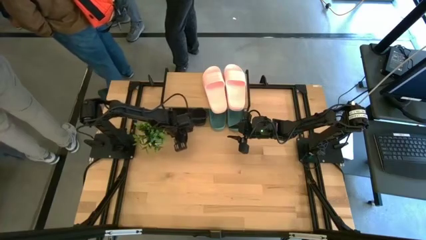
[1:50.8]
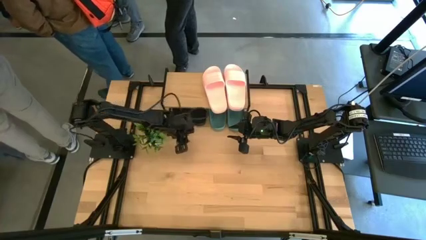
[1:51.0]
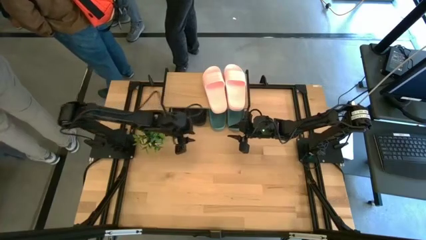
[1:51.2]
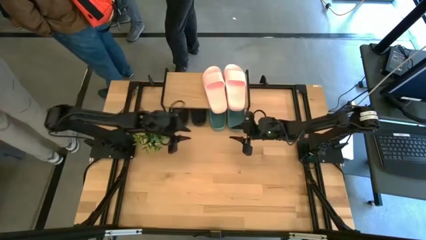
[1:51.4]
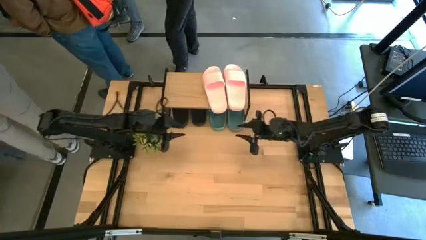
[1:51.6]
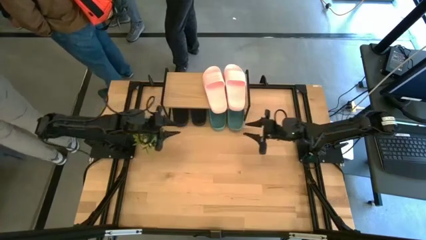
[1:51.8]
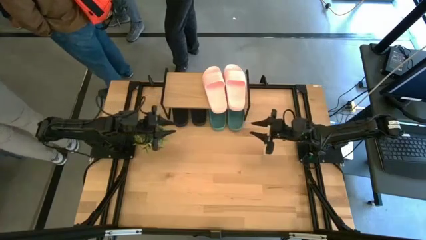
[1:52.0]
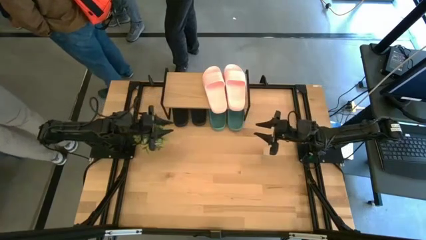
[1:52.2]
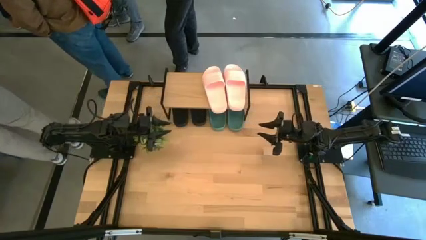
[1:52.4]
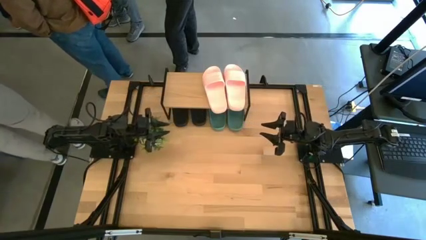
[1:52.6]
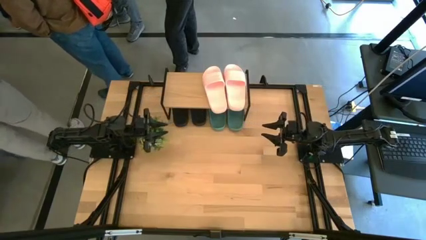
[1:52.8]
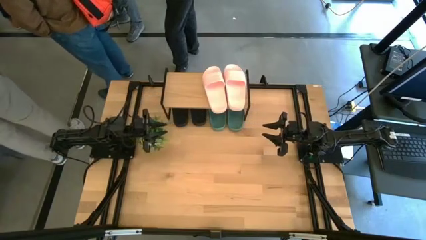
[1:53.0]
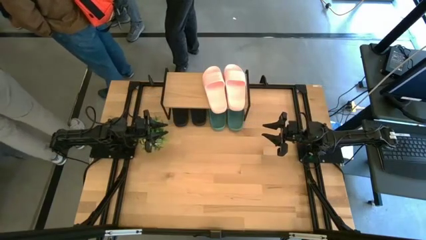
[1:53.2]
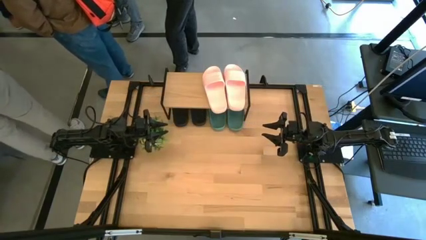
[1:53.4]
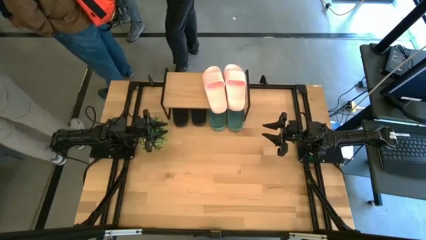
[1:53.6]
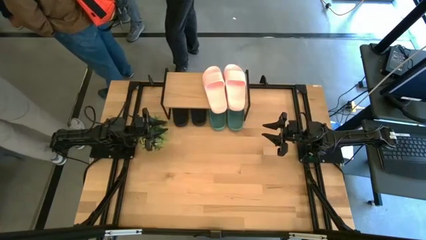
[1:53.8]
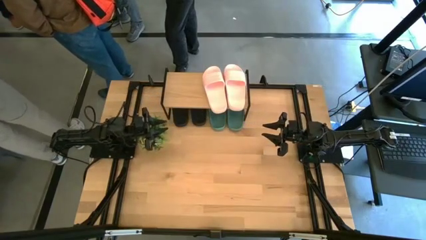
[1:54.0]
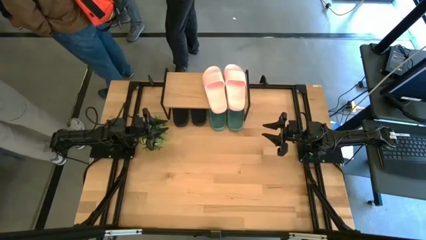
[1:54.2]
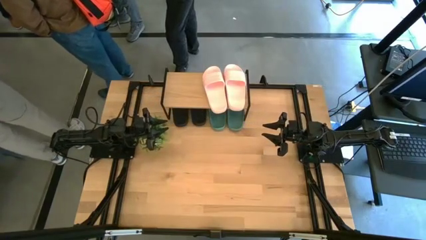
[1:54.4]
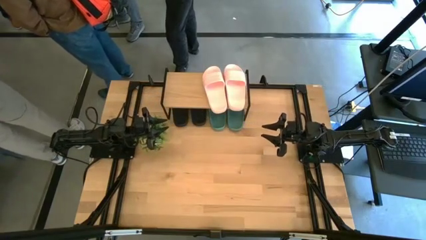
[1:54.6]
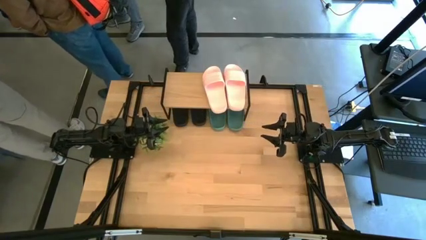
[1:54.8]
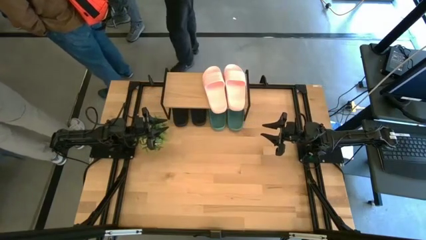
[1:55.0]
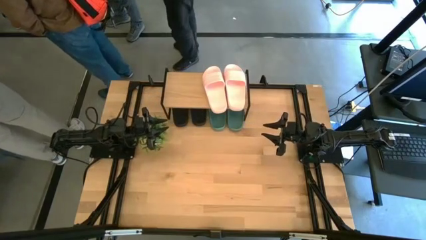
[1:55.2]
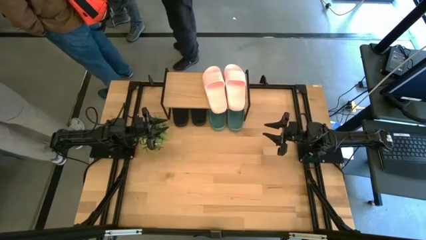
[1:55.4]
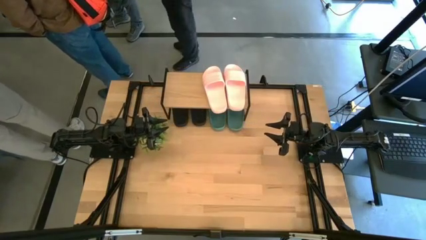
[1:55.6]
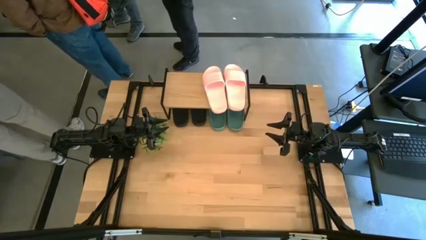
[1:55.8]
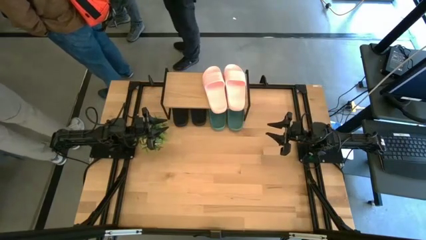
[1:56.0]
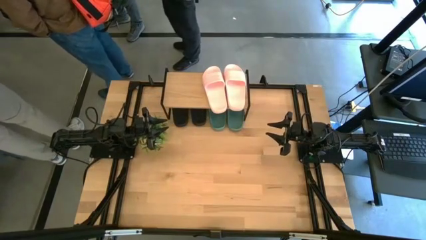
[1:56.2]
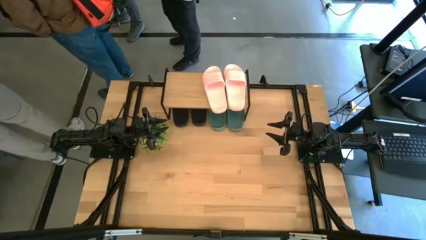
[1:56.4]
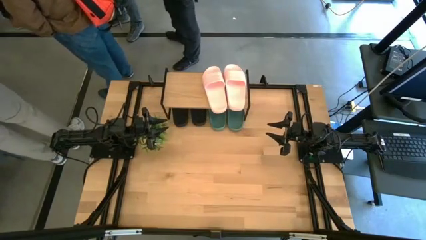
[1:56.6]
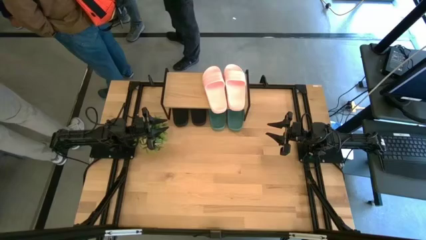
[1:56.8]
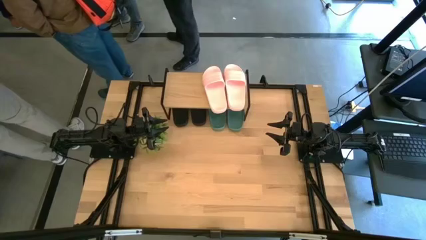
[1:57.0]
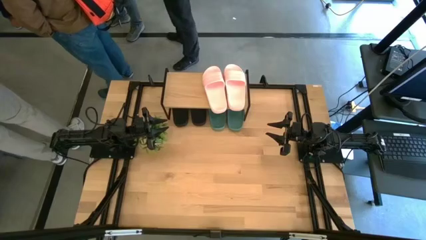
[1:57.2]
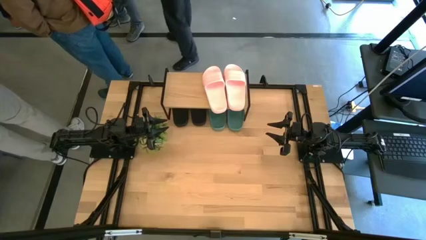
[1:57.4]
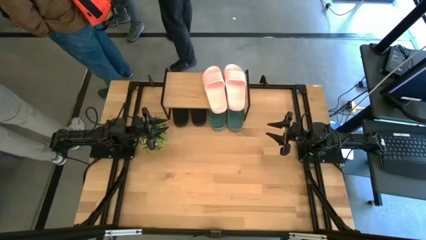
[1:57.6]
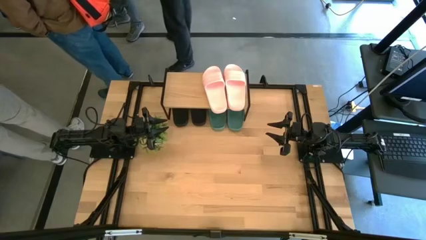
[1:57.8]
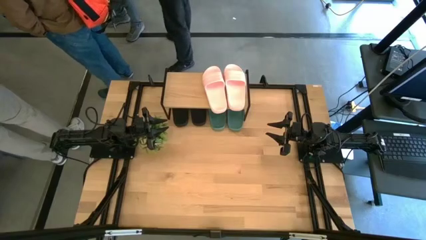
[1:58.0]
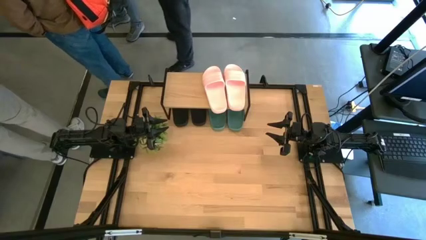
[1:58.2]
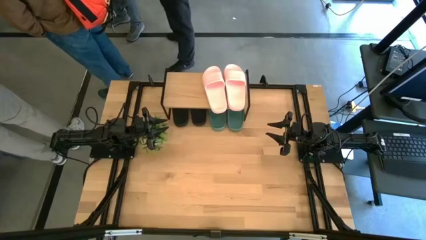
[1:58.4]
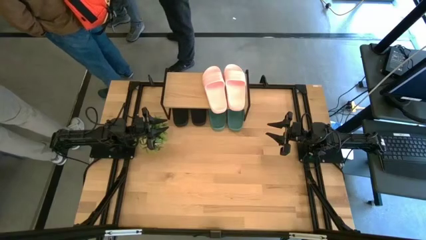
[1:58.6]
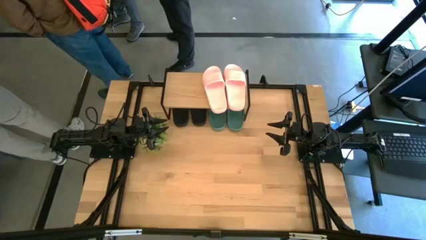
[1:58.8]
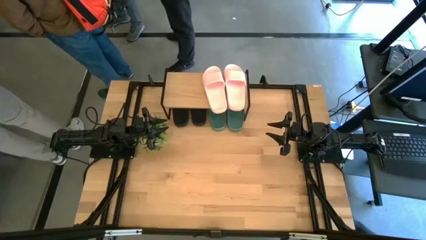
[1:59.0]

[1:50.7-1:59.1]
Task: Pick and place slides into the shelf
Return to Home Position

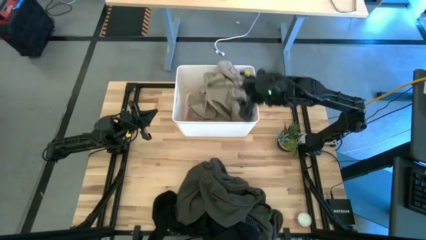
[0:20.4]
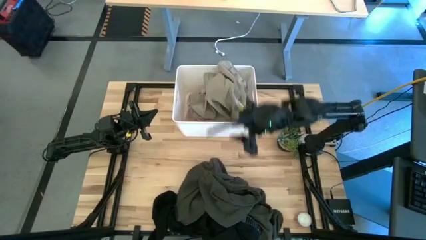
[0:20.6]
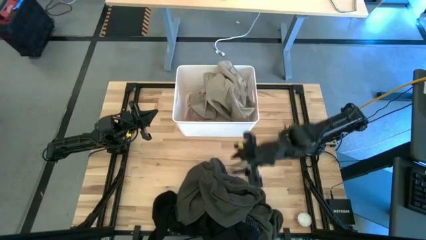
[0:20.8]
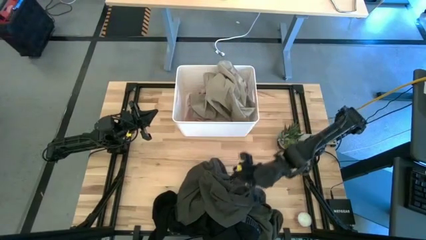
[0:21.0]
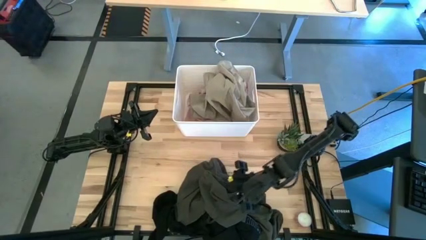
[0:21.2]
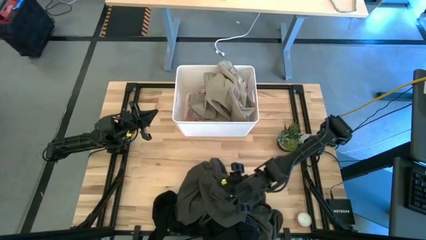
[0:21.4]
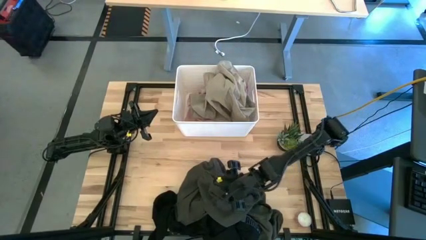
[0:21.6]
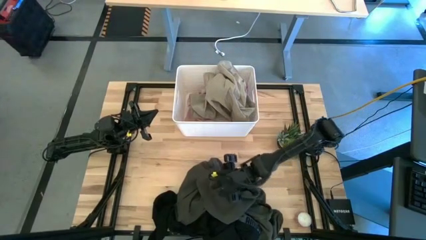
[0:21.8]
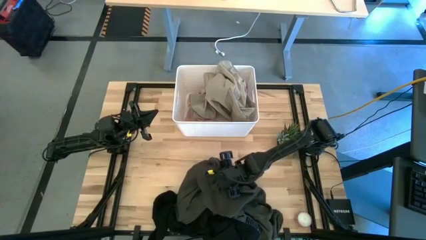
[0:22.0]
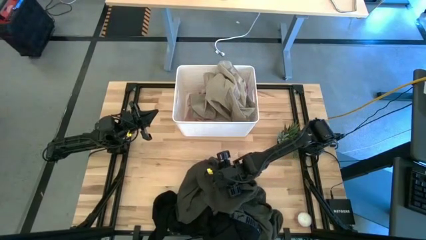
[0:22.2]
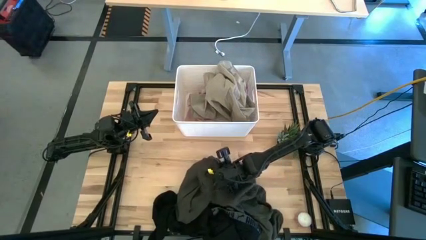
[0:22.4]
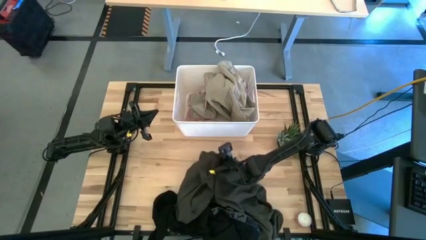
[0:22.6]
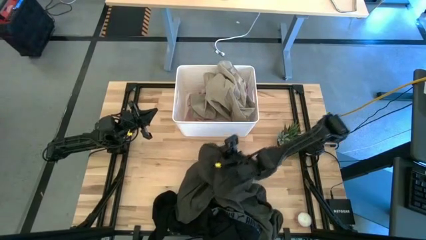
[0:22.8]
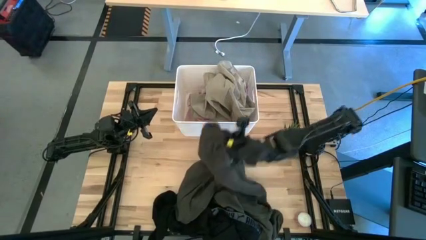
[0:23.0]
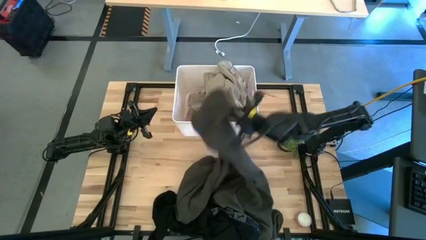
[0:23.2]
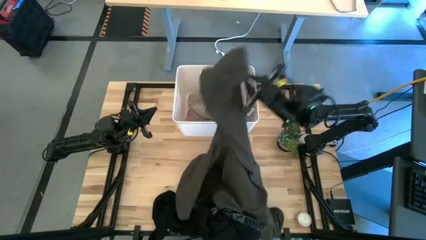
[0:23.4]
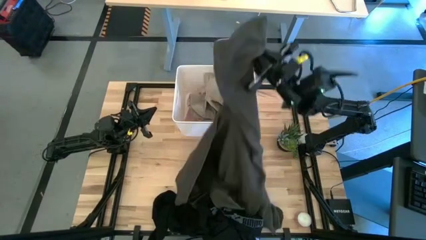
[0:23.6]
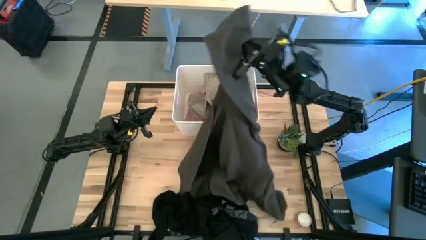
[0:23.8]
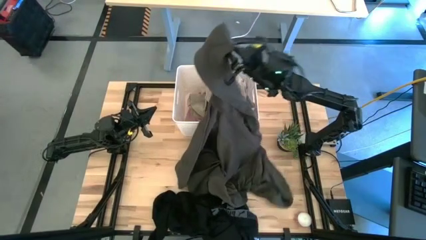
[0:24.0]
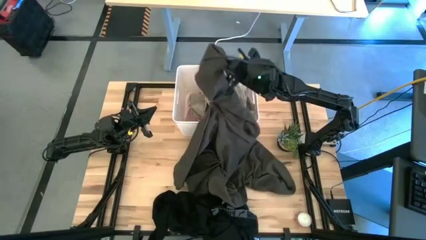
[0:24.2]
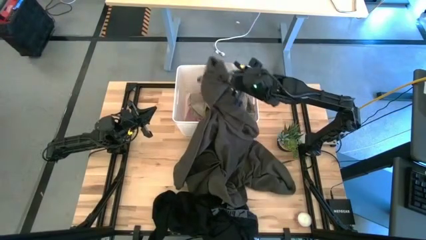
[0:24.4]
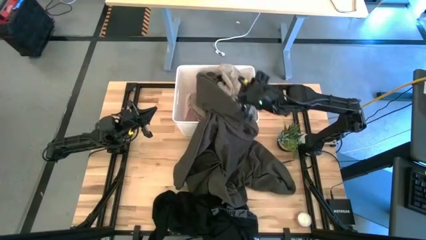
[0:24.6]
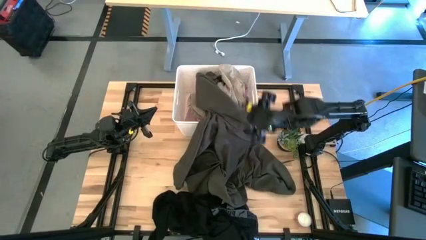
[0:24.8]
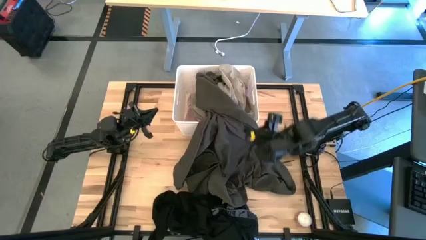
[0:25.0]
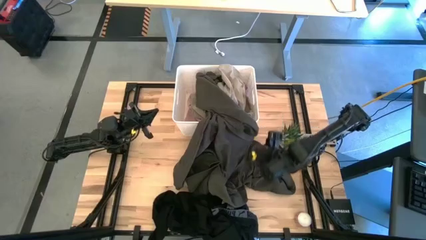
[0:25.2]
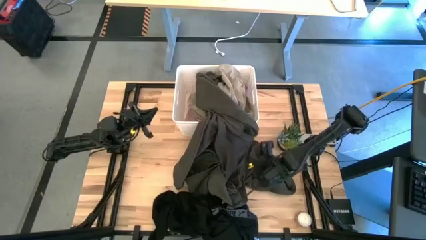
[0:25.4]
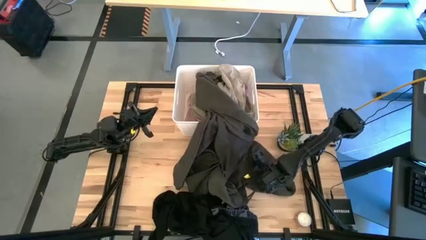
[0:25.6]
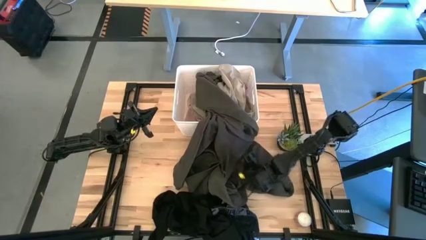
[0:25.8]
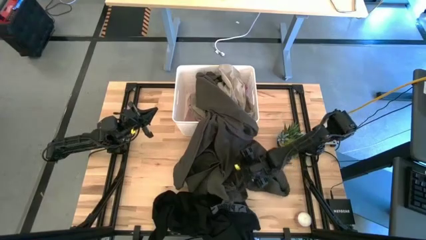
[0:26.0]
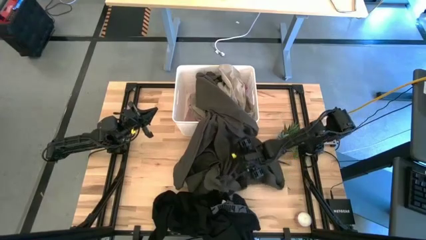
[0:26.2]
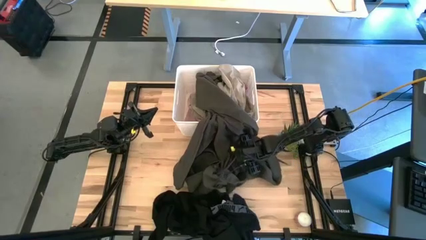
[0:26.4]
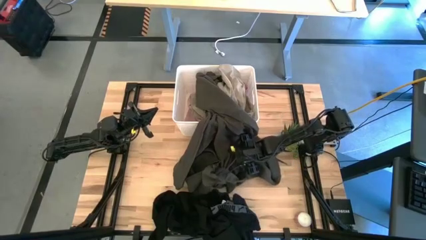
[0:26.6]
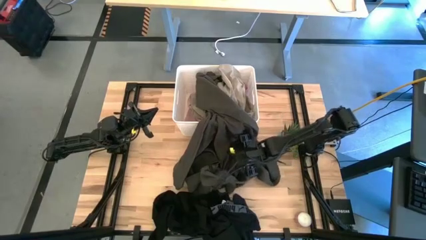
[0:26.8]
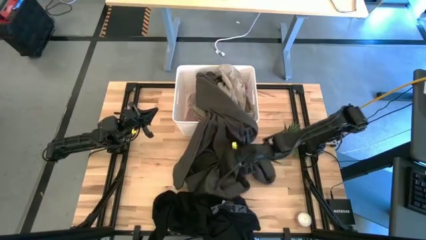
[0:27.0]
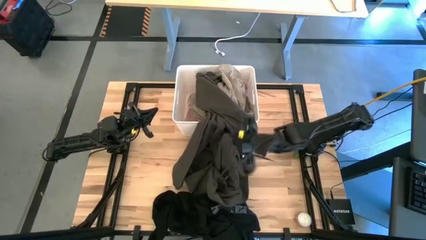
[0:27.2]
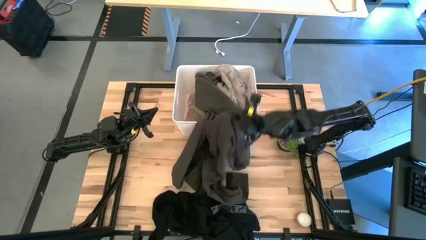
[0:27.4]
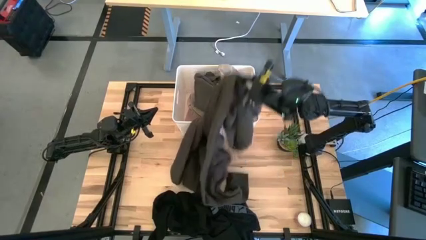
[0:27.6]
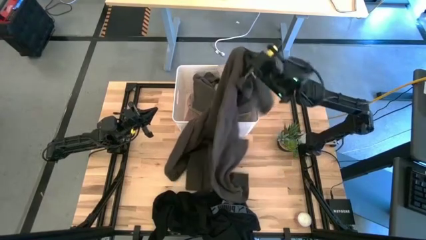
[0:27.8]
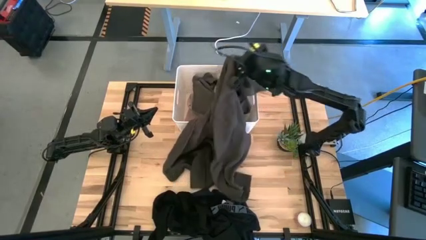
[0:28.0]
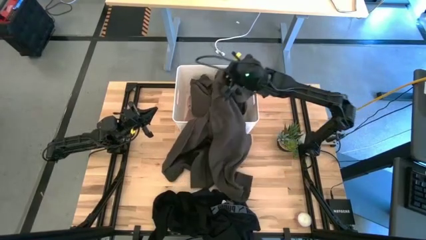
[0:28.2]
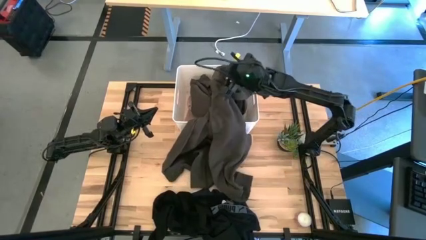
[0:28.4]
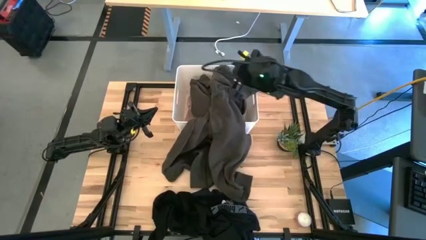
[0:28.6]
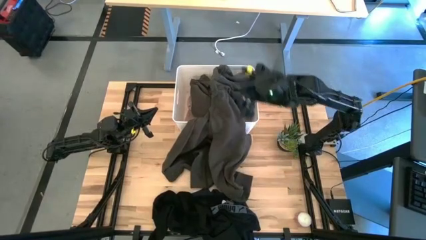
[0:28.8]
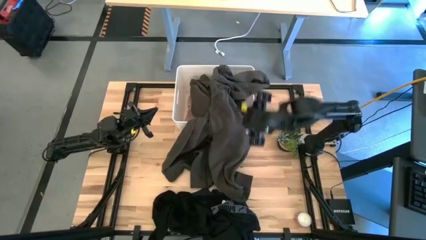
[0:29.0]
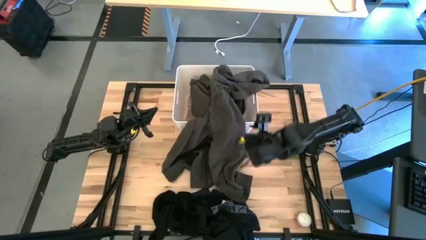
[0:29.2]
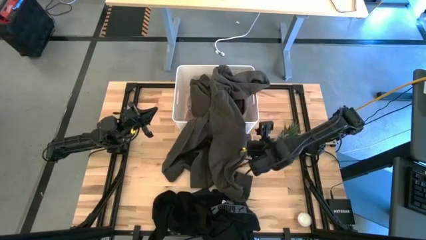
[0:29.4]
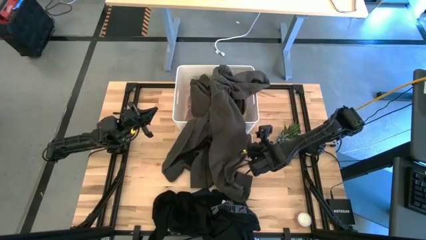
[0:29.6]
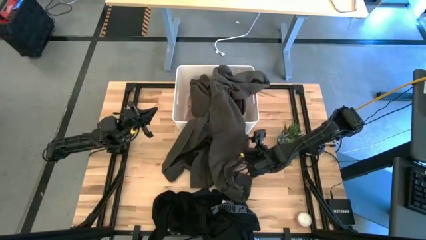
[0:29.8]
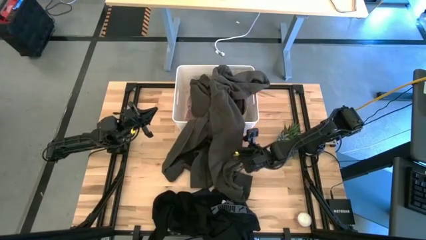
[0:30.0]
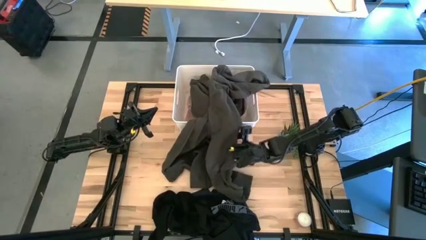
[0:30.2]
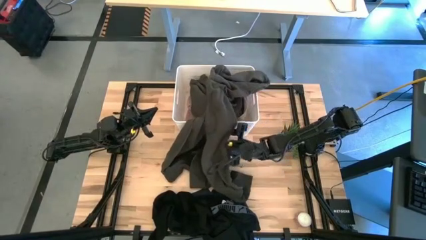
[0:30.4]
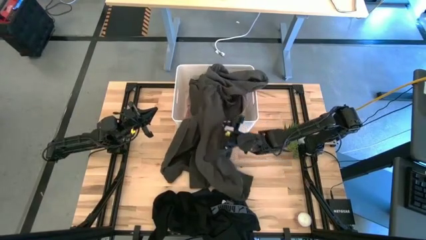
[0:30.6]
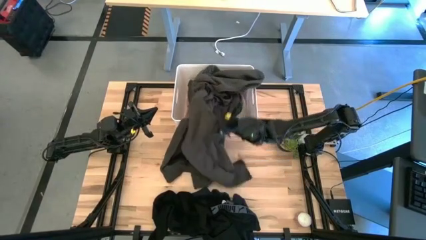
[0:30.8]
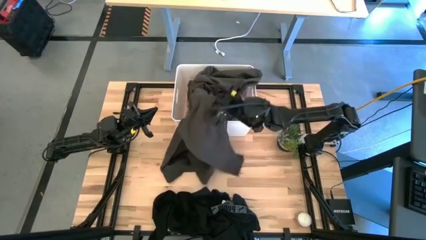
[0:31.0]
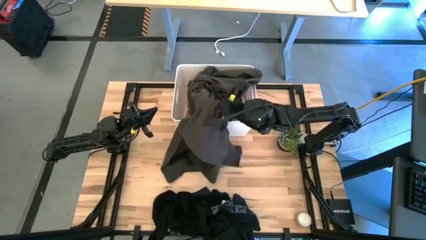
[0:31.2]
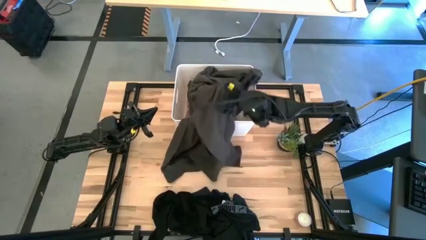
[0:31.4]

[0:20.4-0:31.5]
Task: Sort clothes
Put the dark gray shirt in the white container
